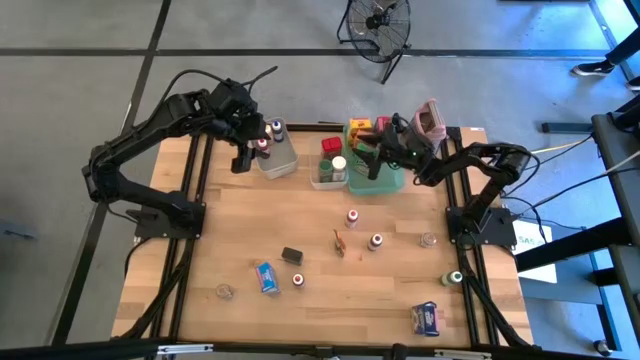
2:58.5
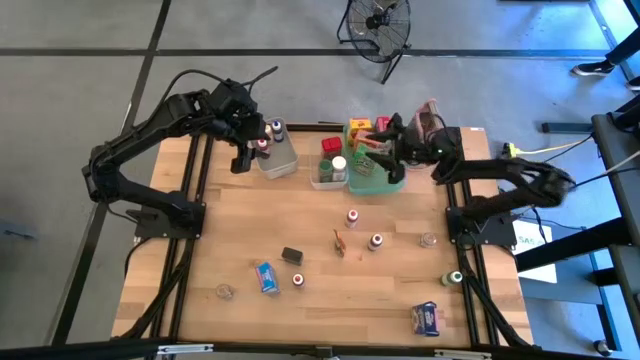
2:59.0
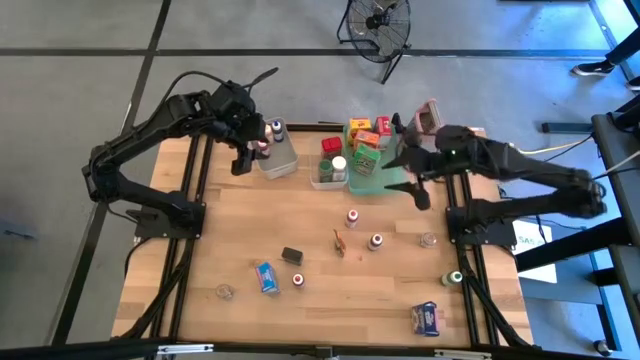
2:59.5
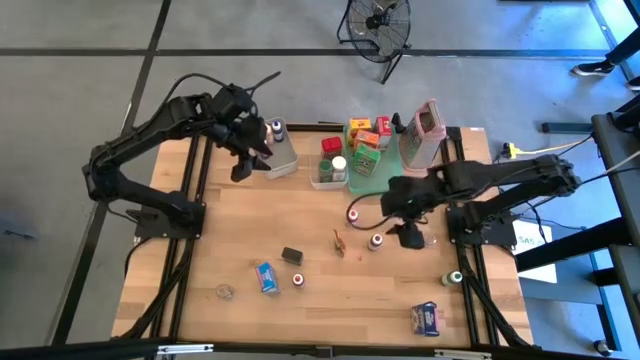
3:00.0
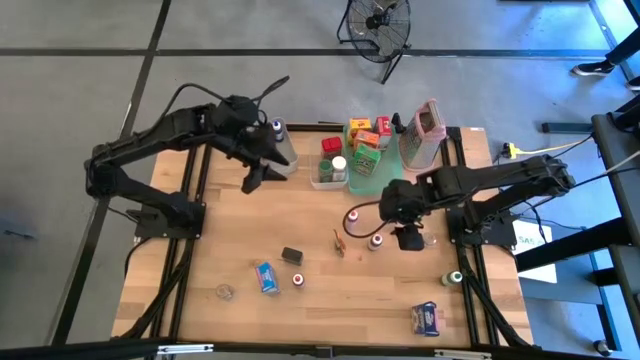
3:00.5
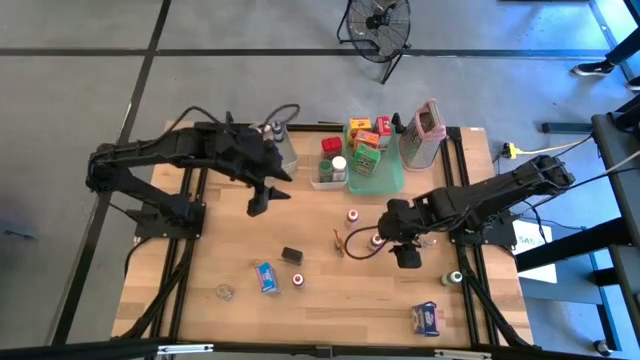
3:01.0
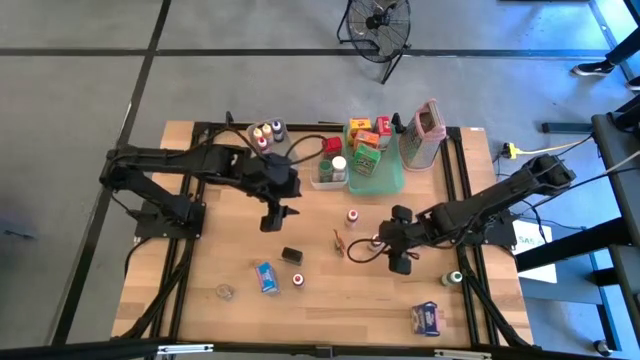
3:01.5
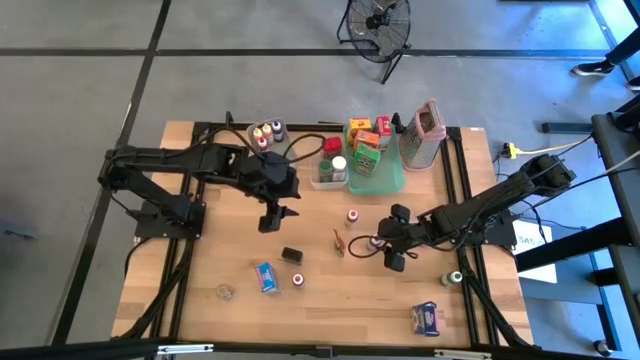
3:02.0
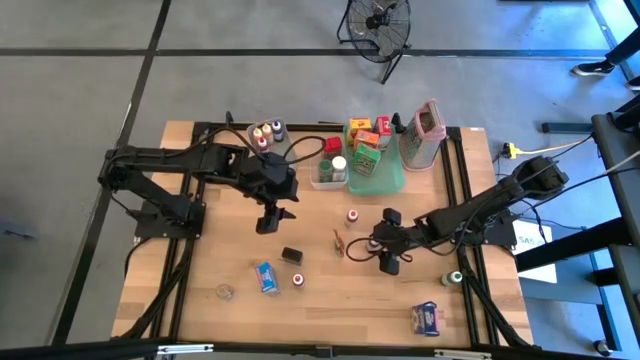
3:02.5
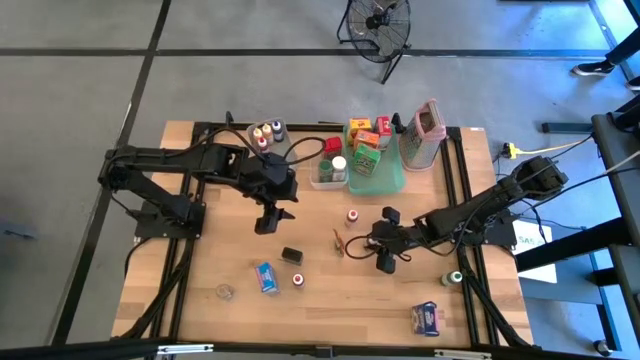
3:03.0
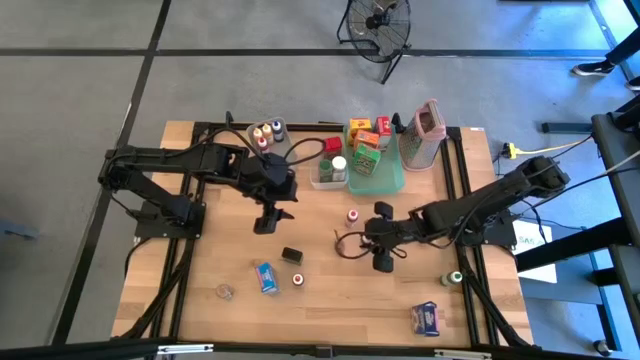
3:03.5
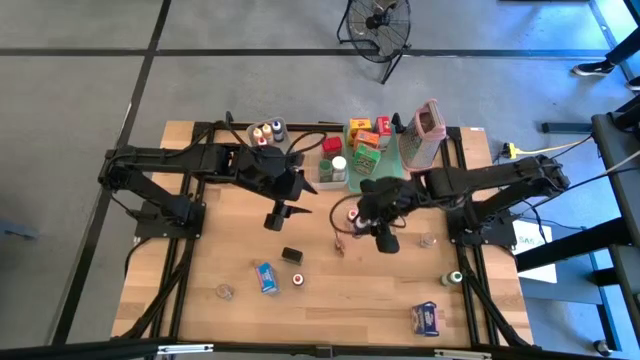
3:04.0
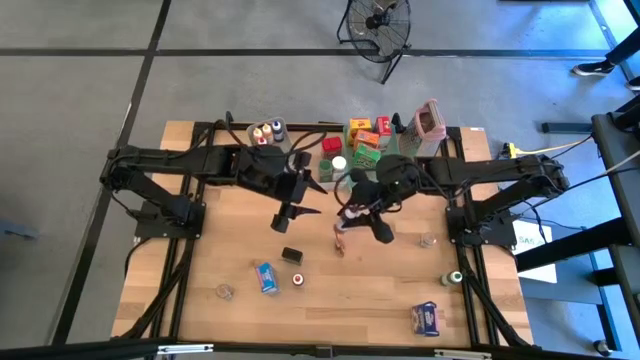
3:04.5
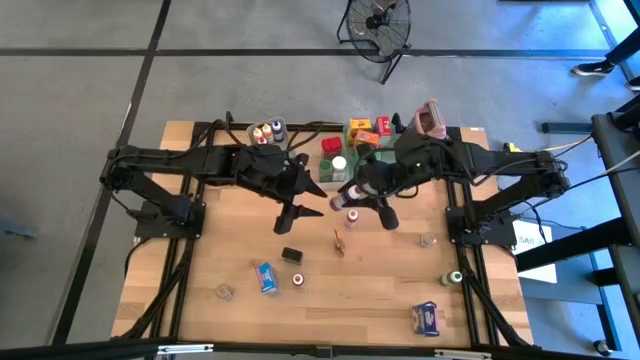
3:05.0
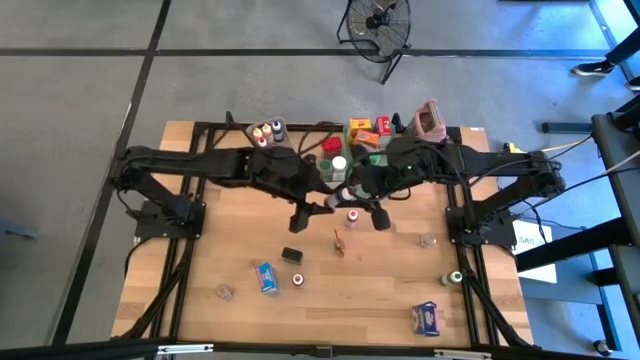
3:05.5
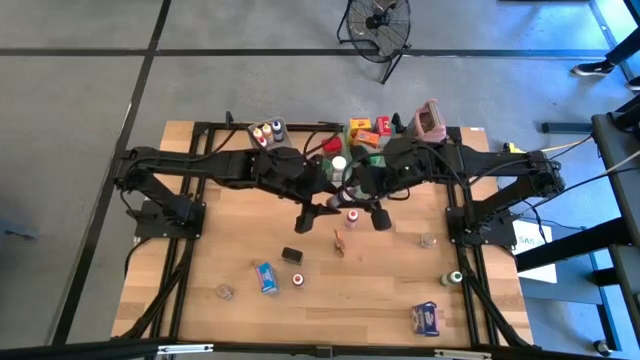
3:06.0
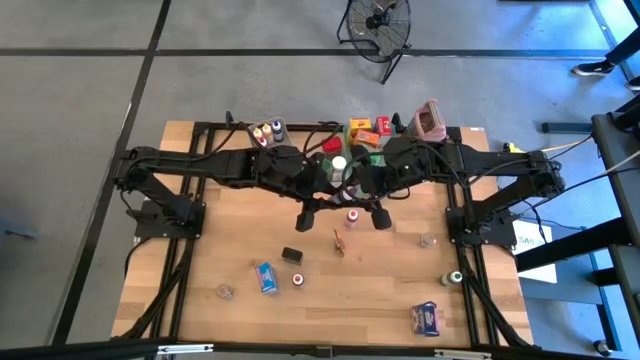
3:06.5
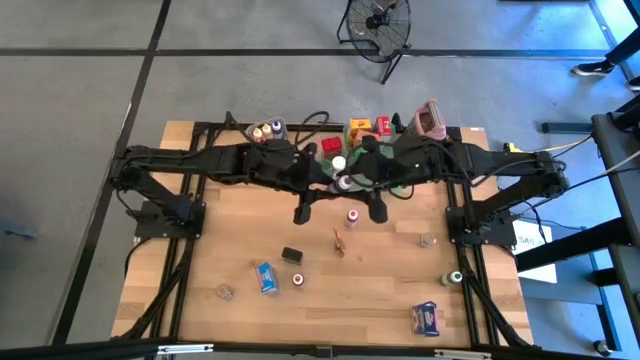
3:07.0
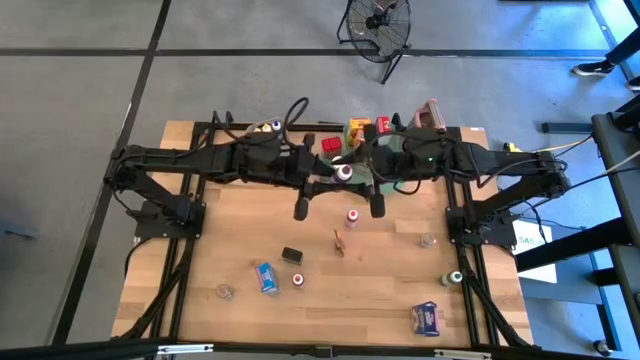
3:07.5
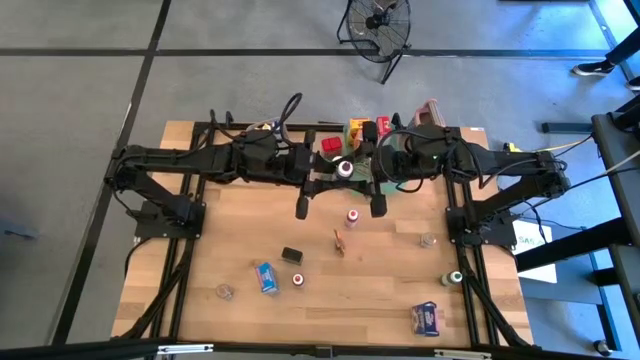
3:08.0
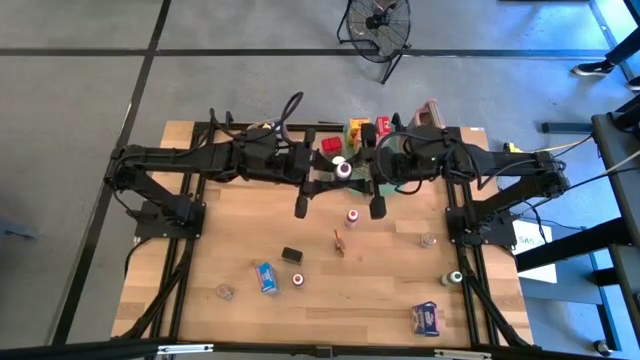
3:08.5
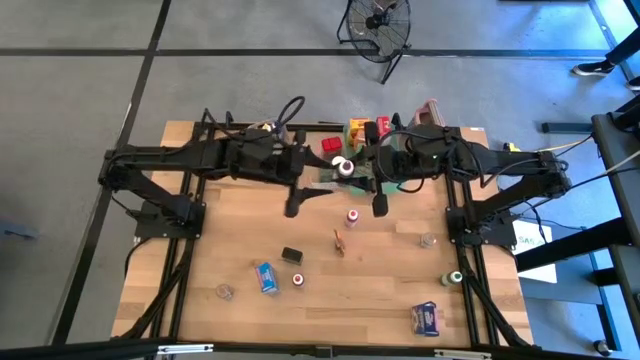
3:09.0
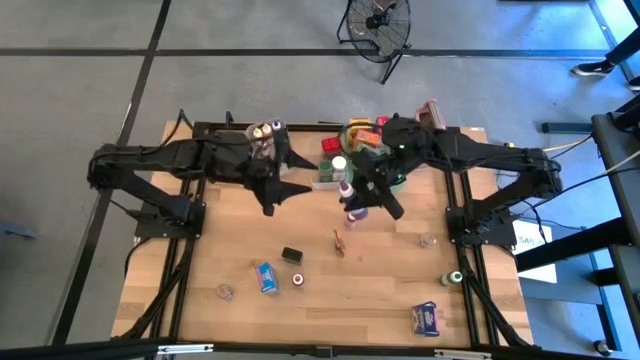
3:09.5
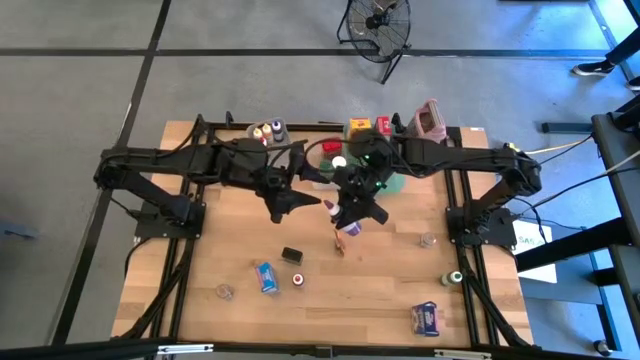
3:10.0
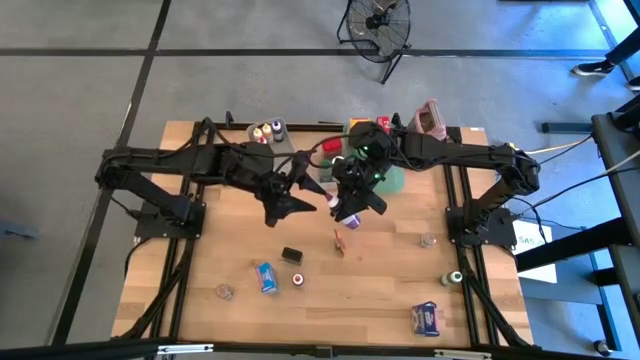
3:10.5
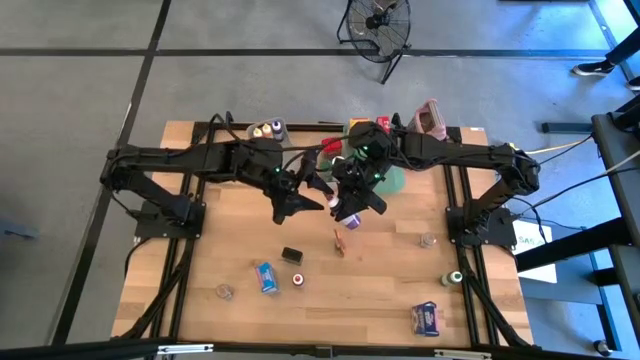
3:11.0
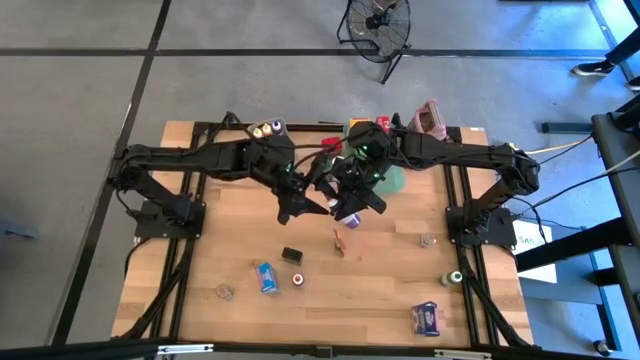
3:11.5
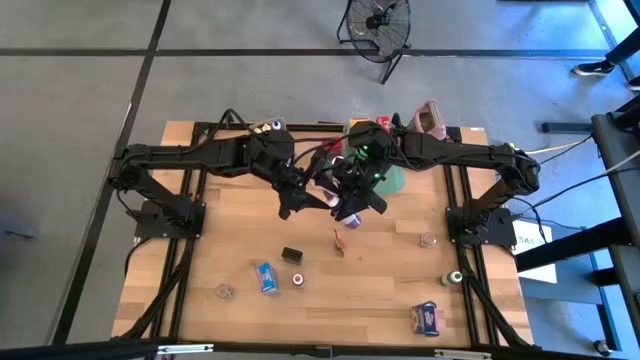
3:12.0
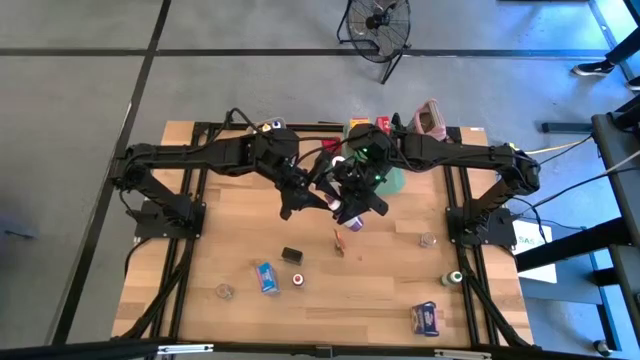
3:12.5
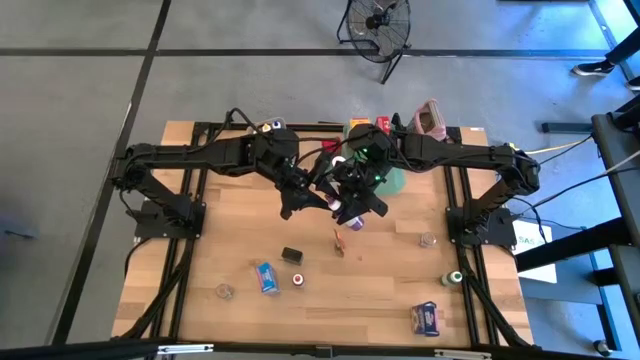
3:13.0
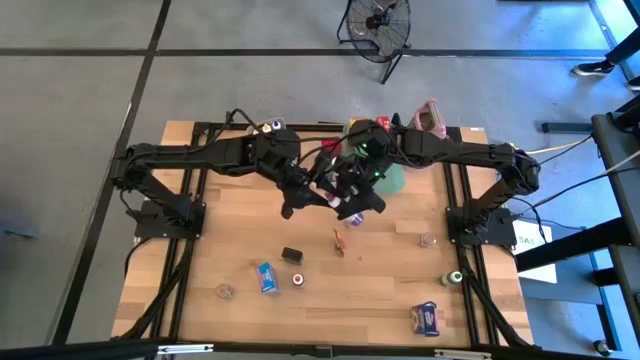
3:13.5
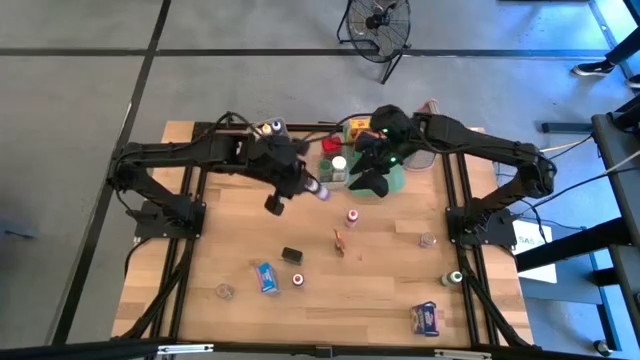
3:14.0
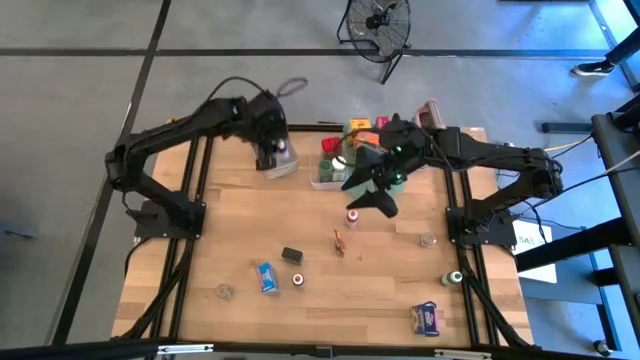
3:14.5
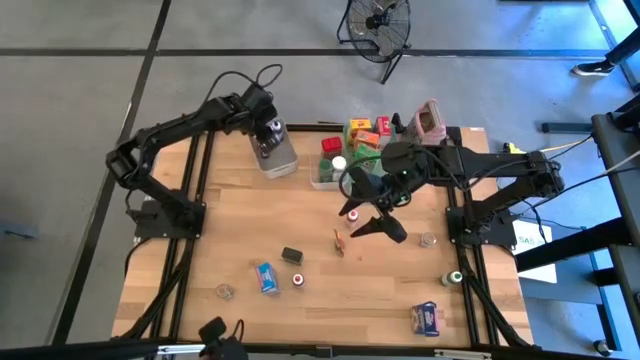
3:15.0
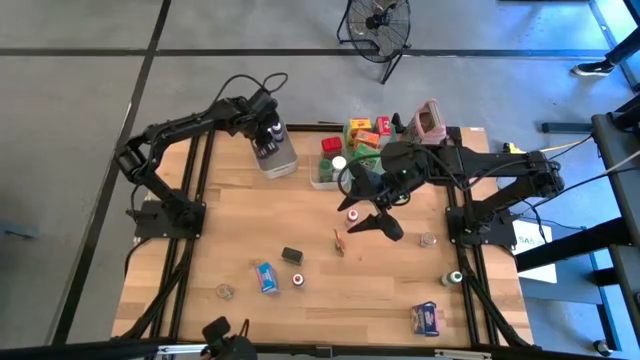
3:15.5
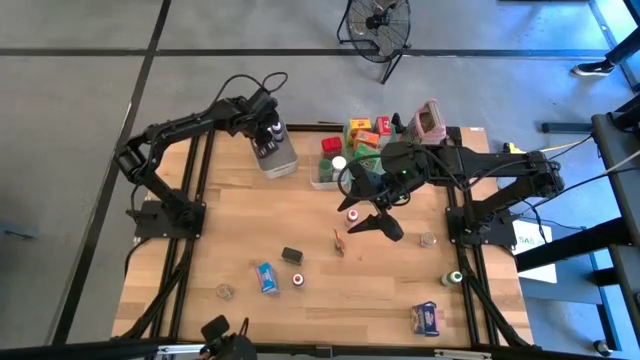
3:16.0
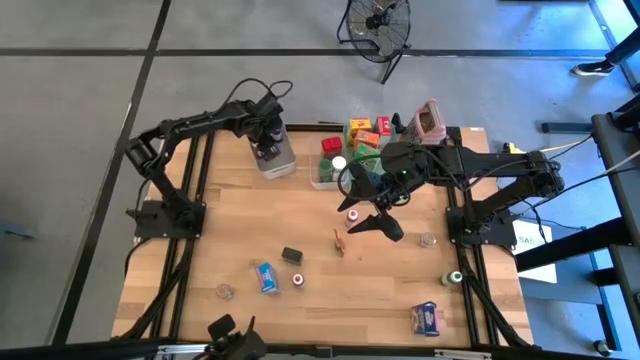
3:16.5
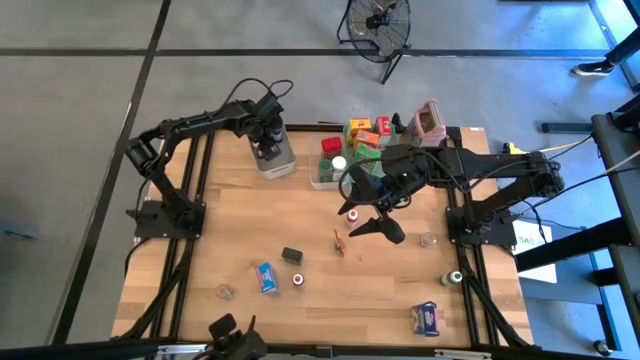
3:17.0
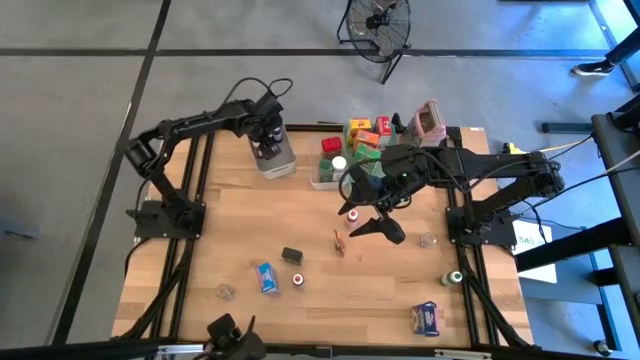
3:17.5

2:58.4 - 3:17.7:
Task: Pick & Place Kitchen Items
Put the violet food coloring bottle into the gray bin

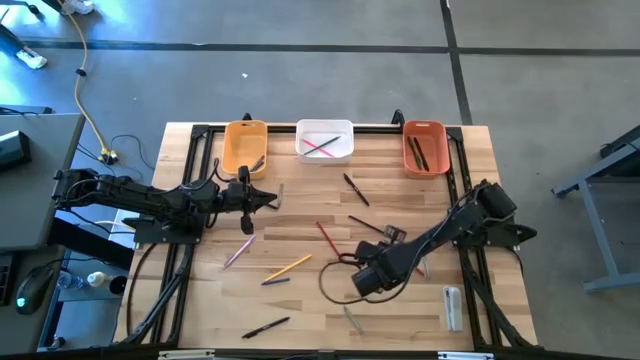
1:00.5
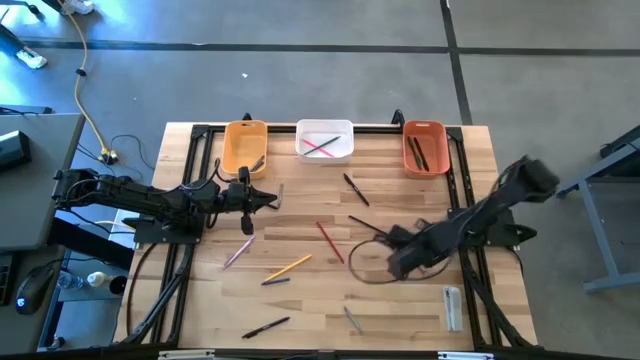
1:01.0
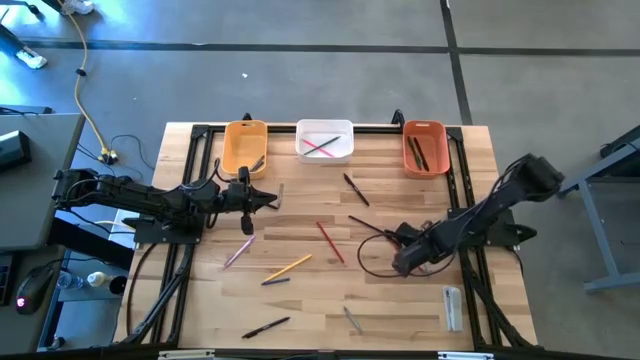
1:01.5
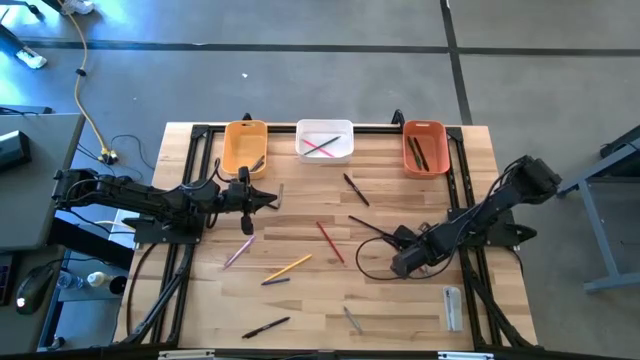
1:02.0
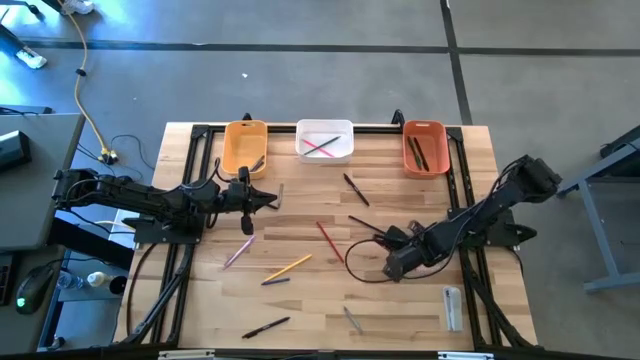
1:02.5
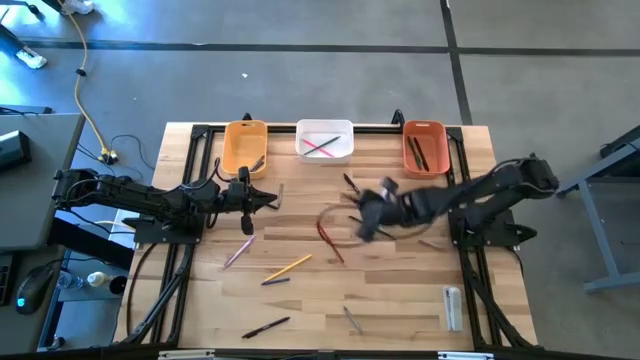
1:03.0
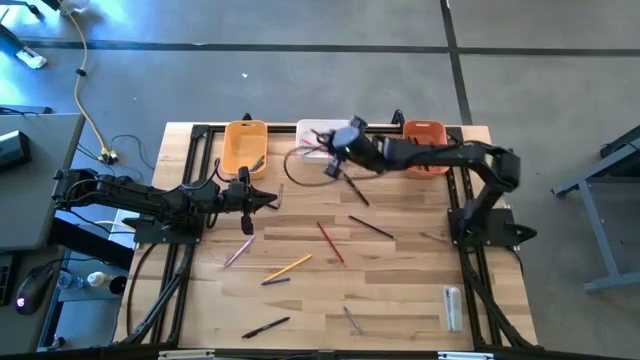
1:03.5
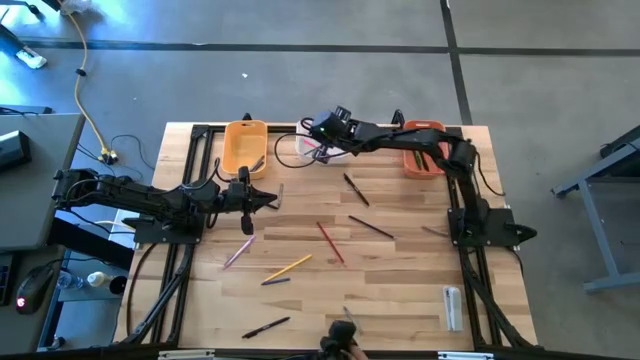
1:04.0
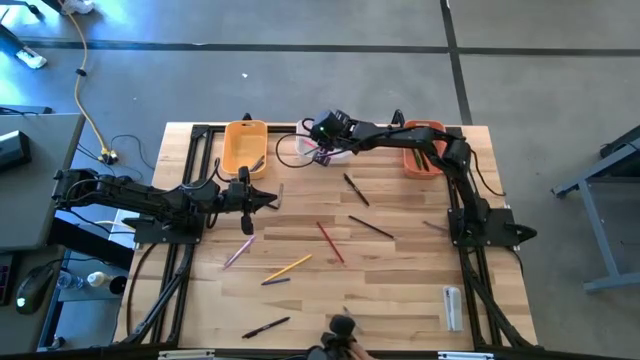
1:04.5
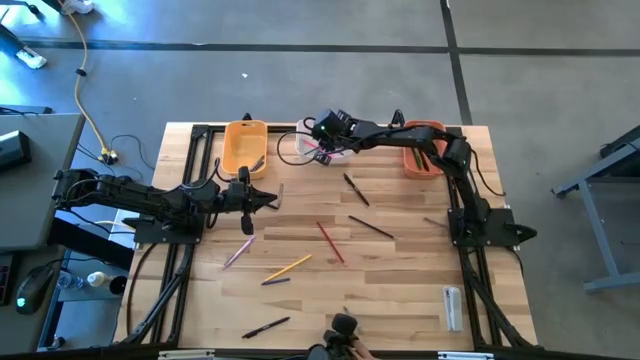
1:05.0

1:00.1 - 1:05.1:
Task: Sort crayons/erasers/pens/pencils in bins
Put the red color pencil into the white bin
